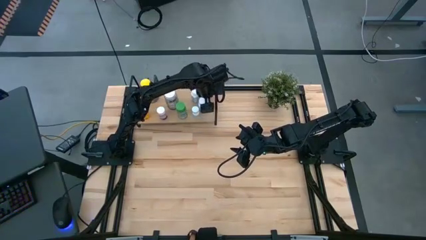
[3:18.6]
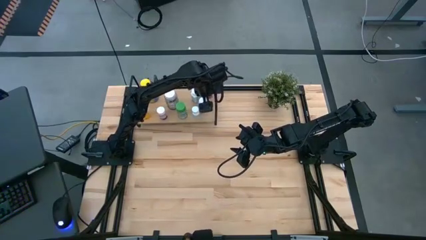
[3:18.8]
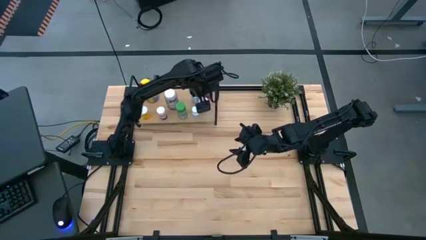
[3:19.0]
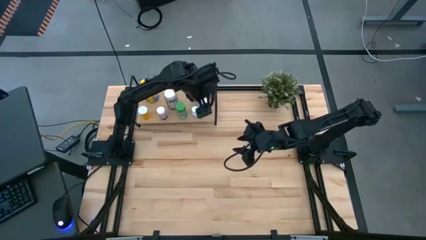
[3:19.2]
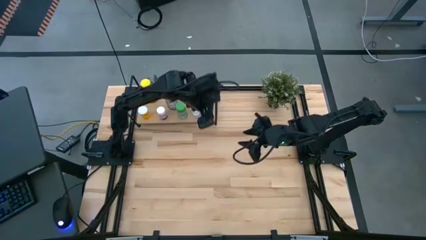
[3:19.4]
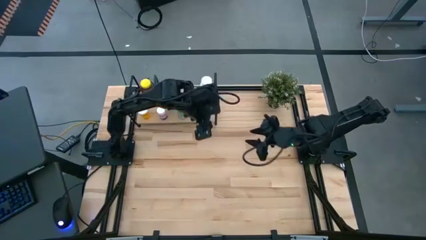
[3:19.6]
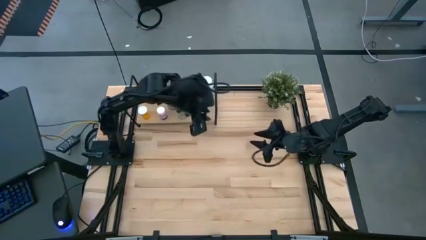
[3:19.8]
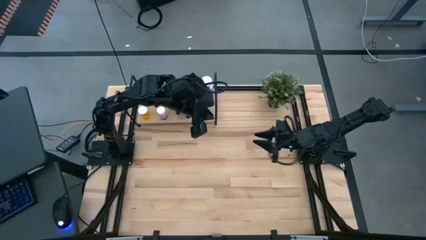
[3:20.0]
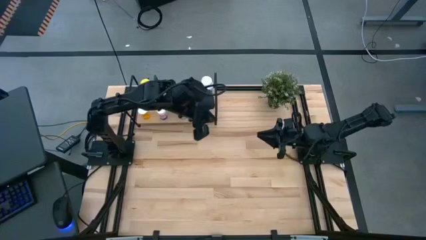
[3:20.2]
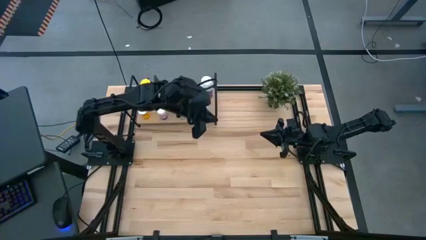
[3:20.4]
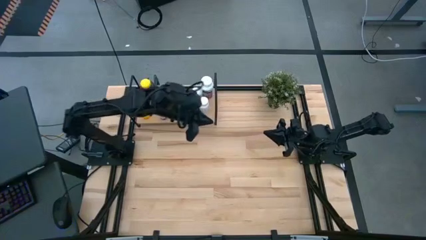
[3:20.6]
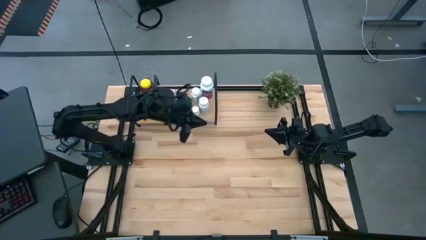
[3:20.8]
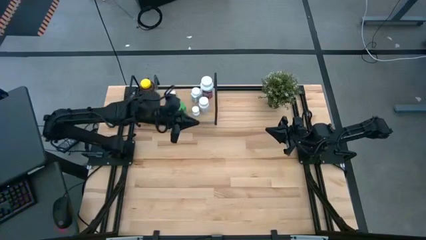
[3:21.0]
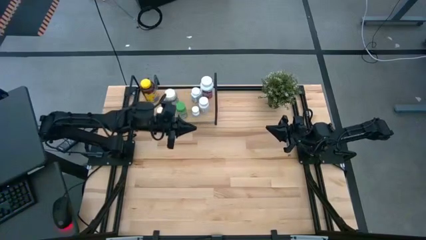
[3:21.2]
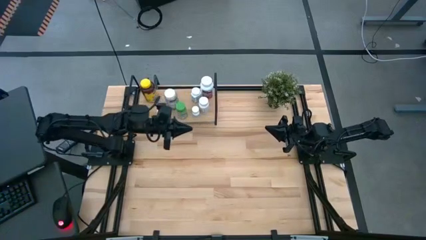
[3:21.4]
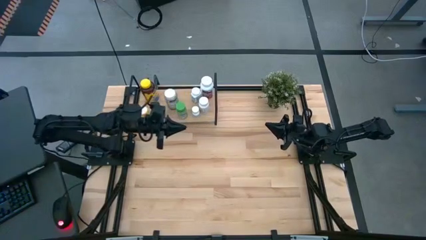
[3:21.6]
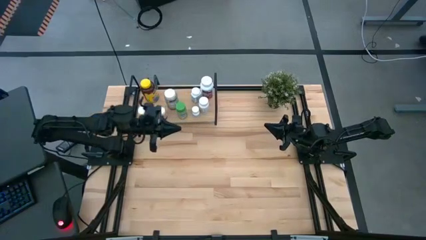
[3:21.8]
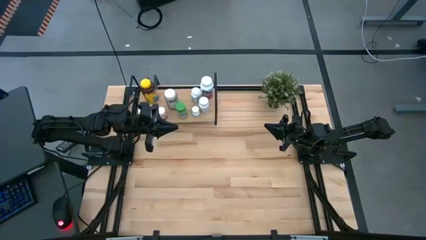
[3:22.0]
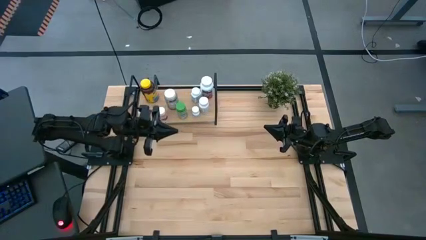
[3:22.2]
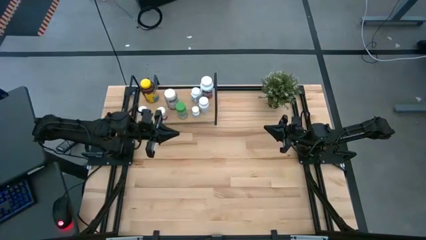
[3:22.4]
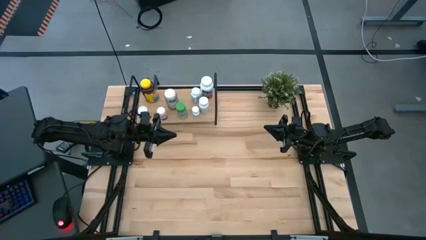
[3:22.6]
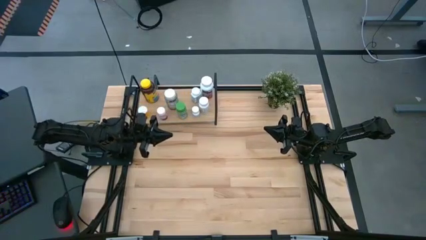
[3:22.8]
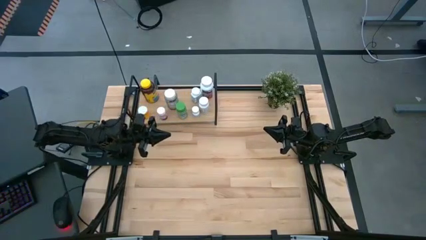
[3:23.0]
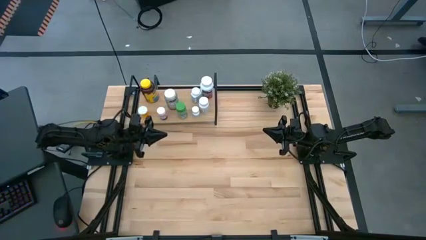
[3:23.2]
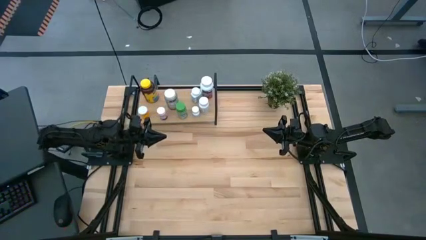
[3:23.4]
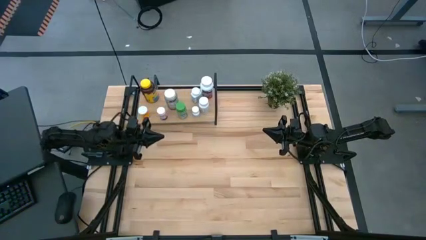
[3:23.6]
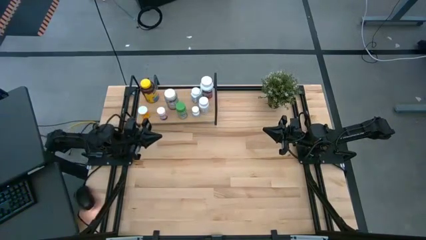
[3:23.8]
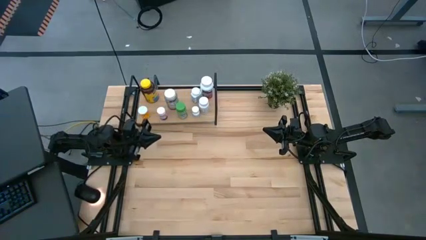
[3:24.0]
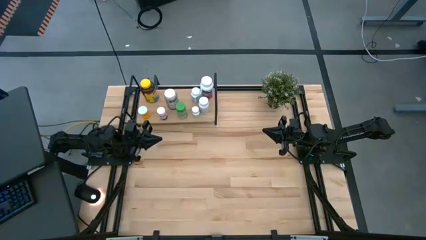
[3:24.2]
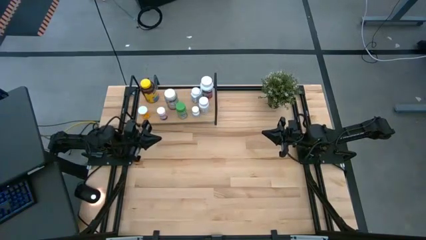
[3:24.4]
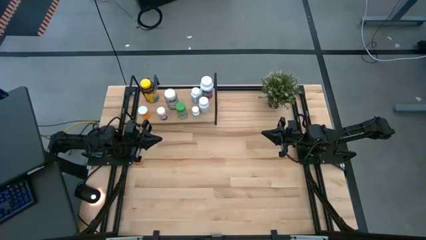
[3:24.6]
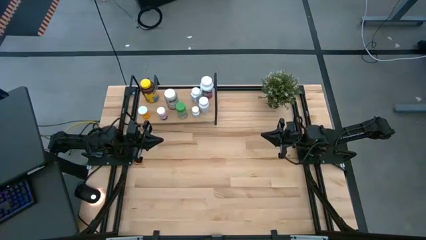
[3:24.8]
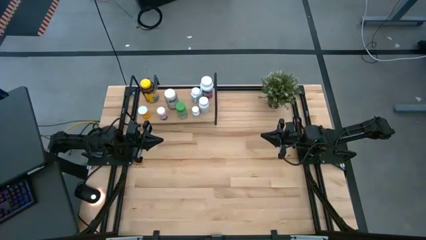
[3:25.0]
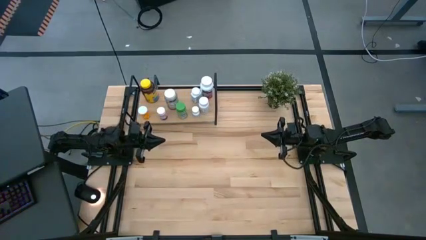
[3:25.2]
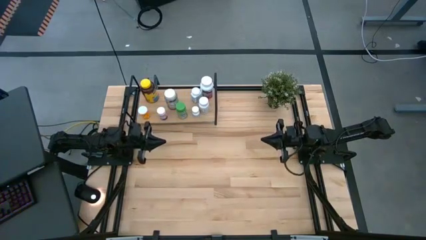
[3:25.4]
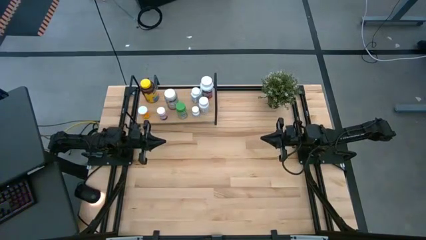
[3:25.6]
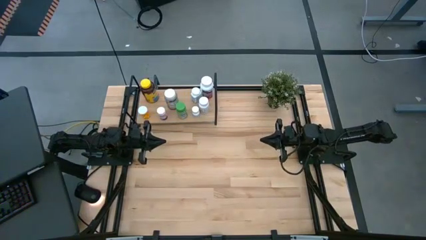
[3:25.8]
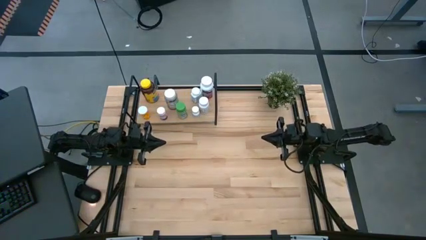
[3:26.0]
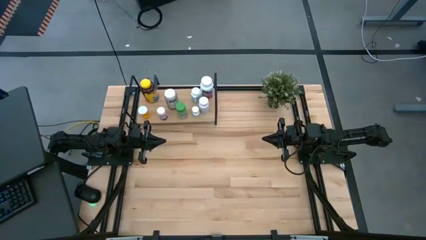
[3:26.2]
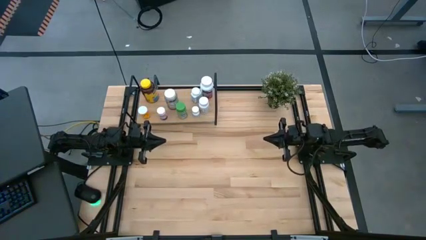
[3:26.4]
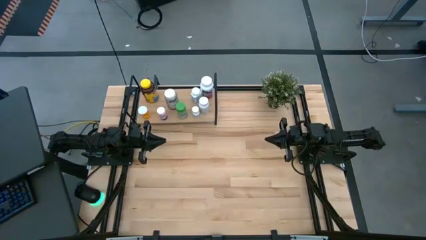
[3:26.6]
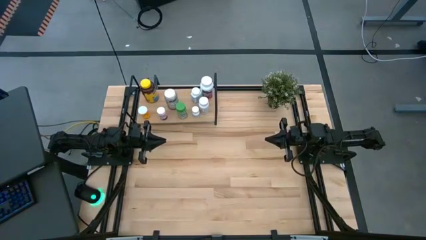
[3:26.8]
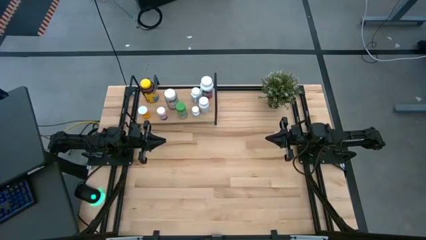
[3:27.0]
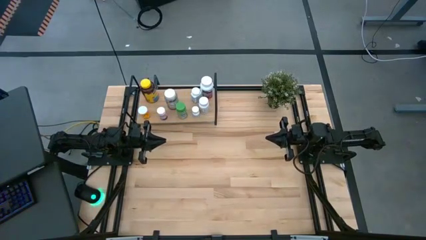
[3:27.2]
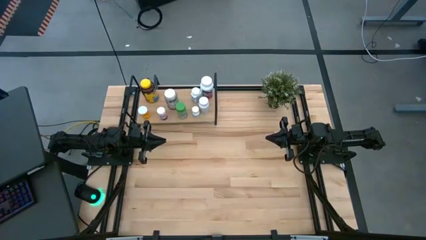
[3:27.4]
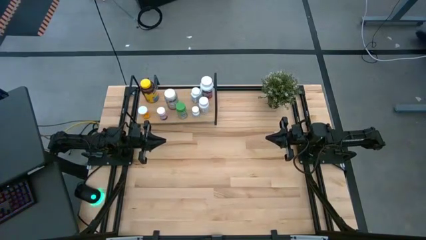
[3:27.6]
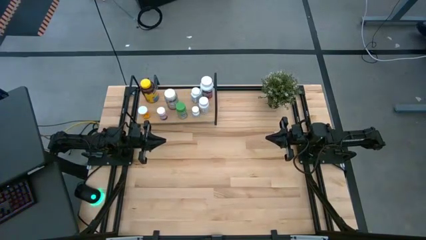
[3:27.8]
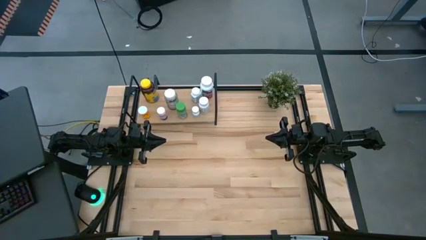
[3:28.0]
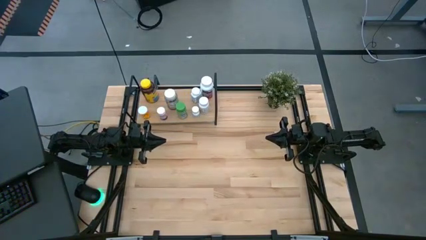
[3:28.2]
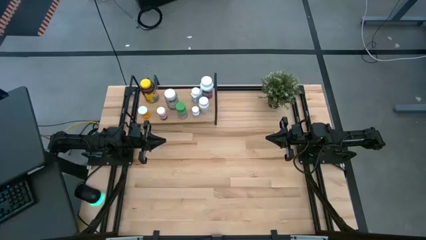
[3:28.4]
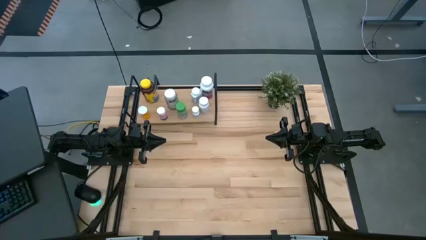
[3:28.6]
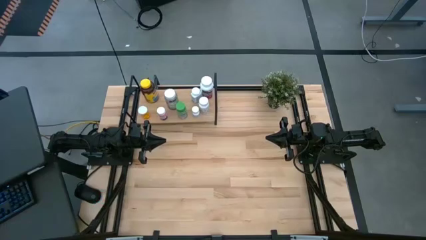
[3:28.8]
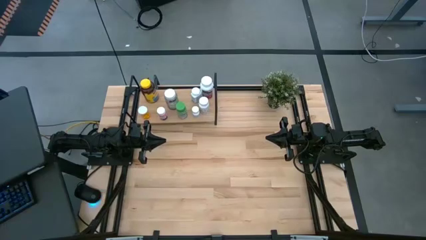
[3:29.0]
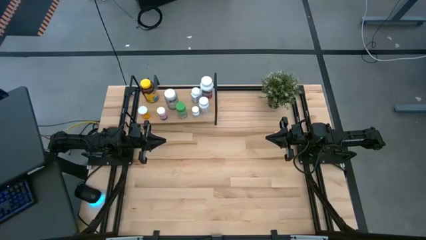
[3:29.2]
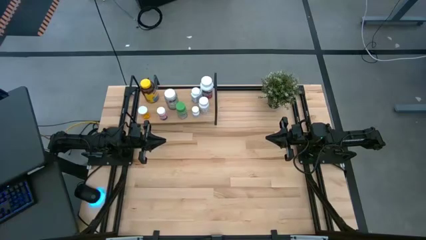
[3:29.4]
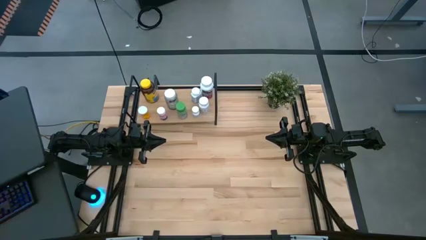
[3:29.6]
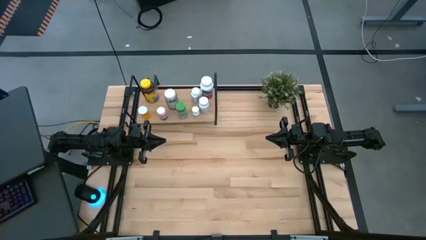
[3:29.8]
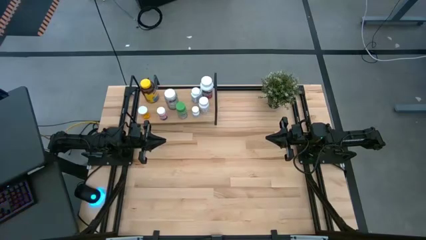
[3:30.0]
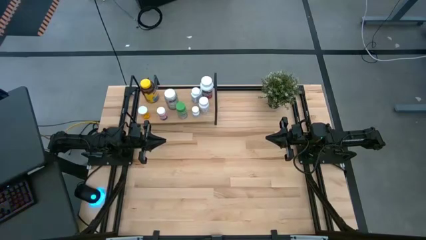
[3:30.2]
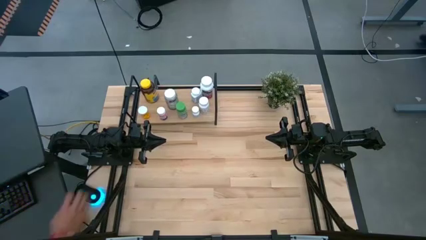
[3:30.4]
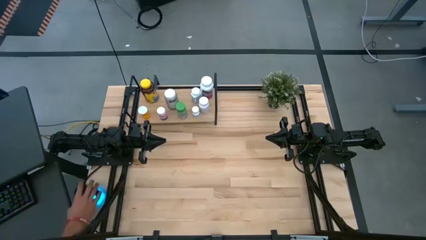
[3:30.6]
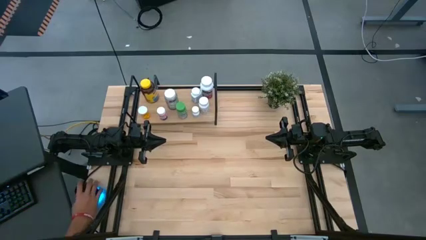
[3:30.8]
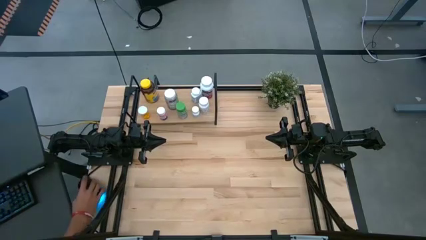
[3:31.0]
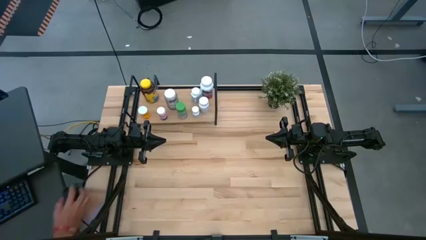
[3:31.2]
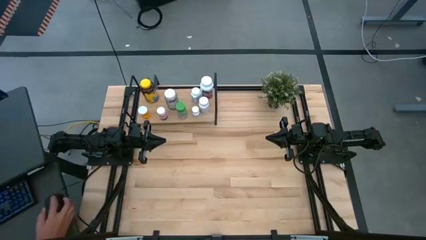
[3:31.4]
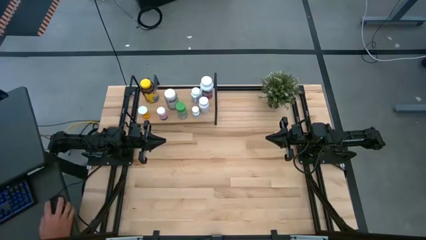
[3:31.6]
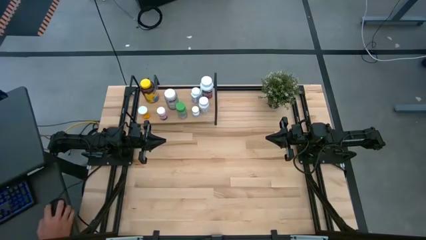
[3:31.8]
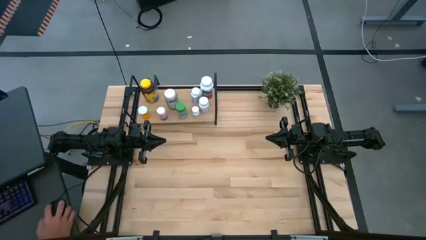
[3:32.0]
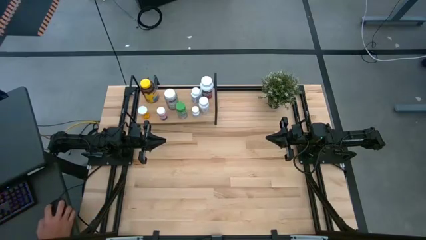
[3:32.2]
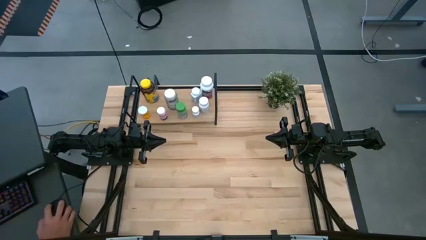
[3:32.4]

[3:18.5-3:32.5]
Task: Pick and place medicine bottles onto shelf by color
Return To Home Position

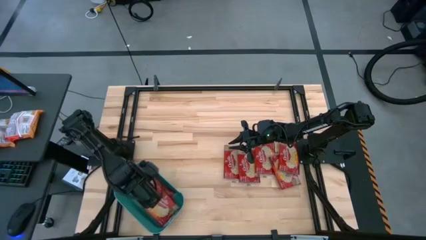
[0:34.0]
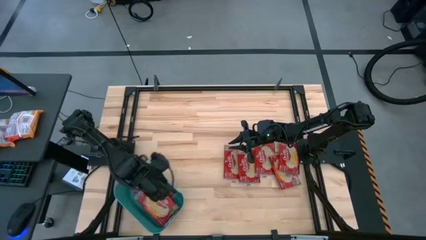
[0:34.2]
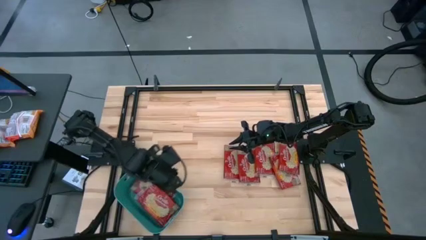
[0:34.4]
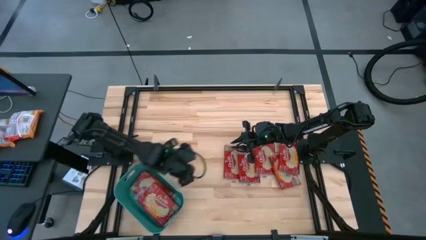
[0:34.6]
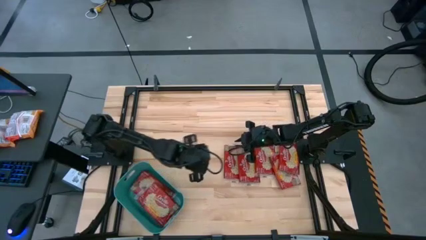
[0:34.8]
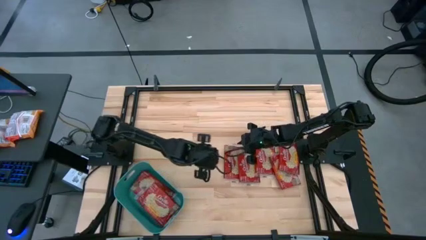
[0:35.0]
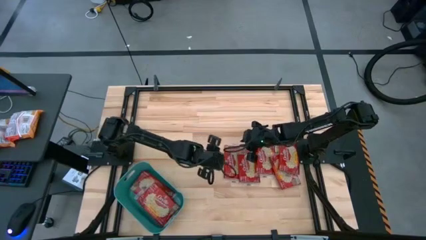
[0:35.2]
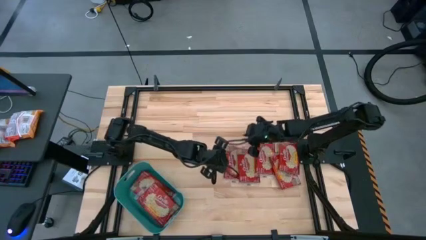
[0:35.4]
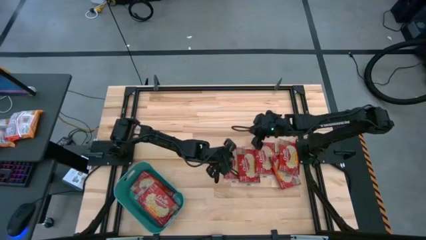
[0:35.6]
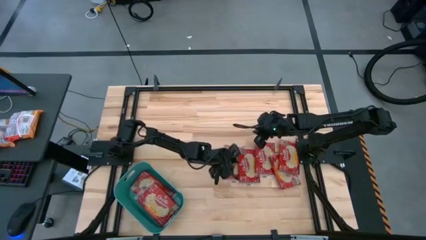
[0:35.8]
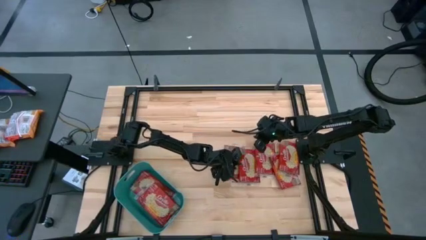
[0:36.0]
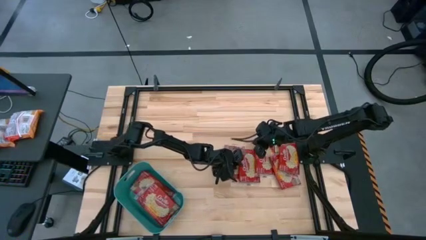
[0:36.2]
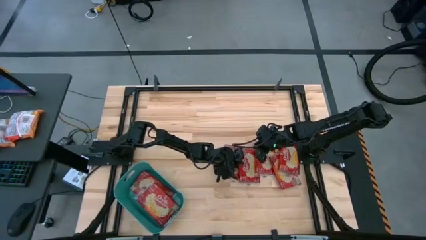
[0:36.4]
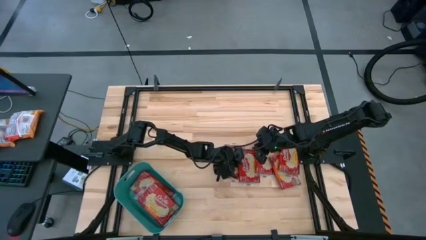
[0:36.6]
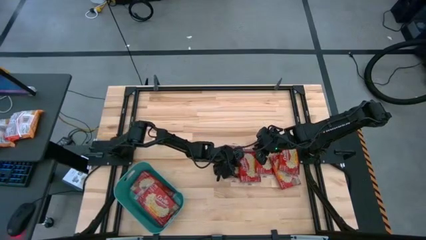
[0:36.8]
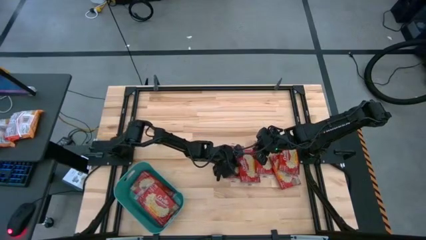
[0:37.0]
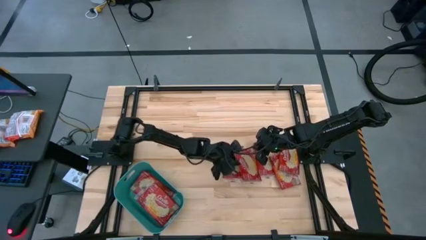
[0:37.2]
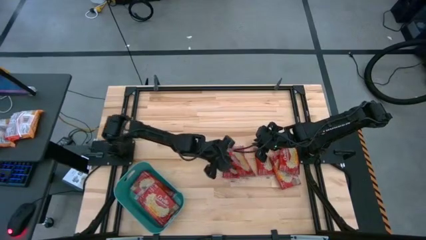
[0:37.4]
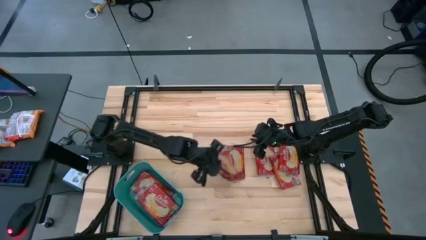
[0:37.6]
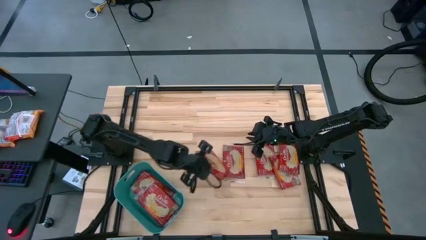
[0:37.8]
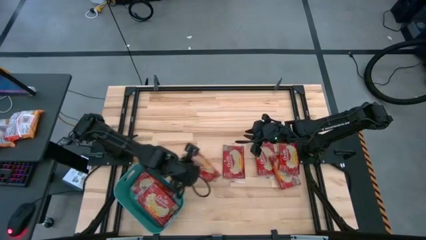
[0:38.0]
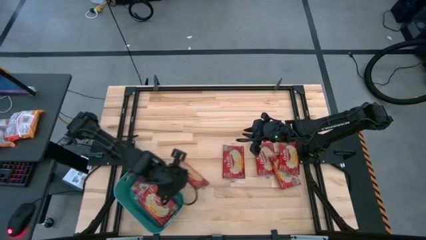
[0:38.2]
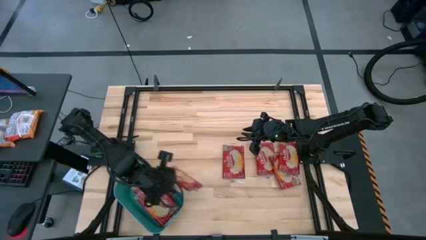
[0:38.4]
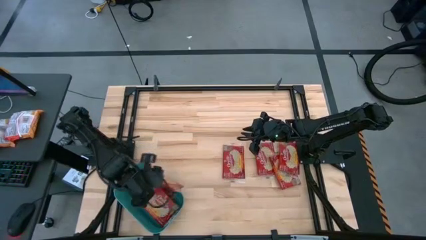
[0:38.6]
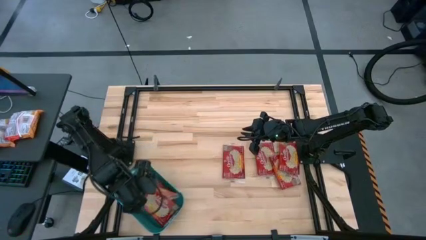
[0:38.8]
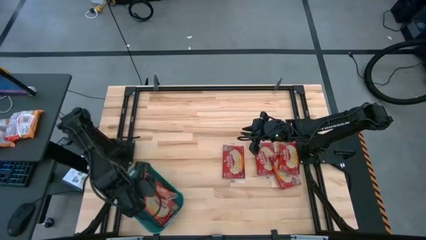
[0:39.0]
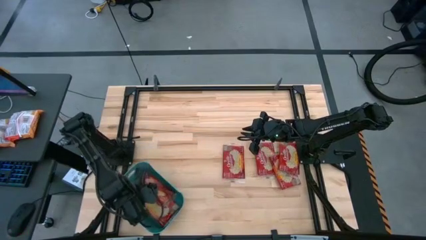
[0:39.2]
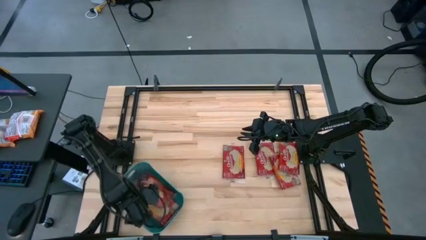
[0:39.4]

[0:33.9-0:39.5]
Task: Sort popcorn bags into baskets
Put the popcorn bag into the blue bin
